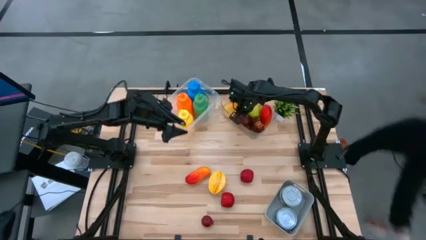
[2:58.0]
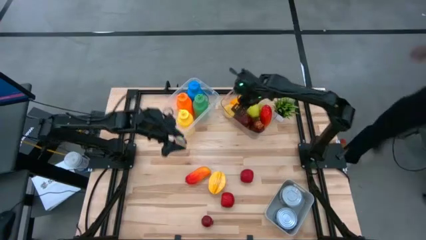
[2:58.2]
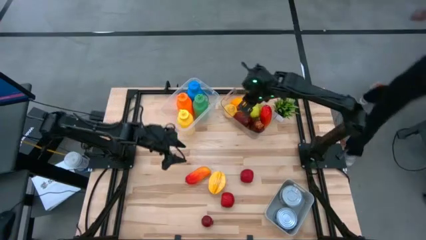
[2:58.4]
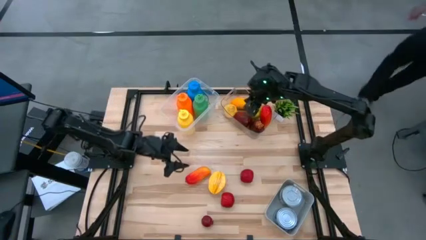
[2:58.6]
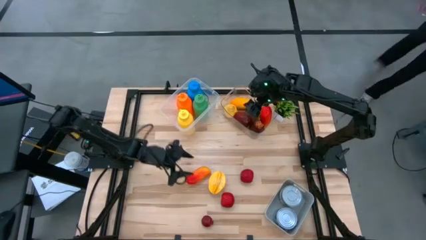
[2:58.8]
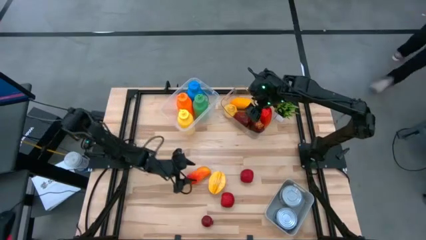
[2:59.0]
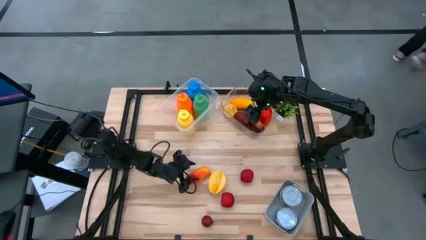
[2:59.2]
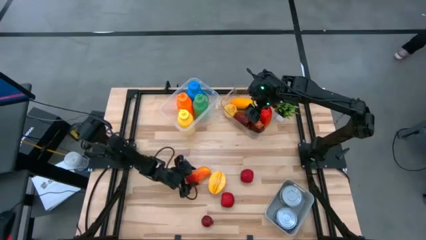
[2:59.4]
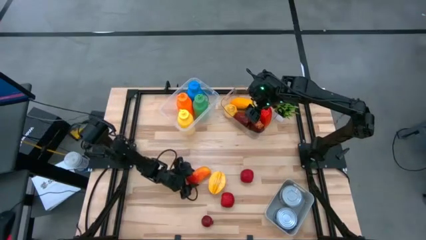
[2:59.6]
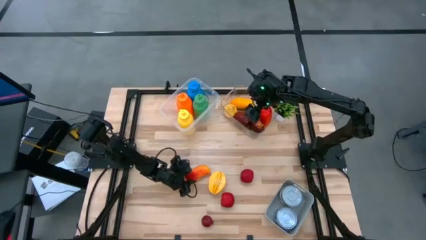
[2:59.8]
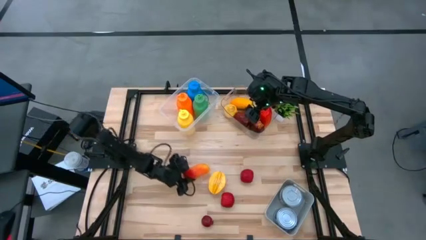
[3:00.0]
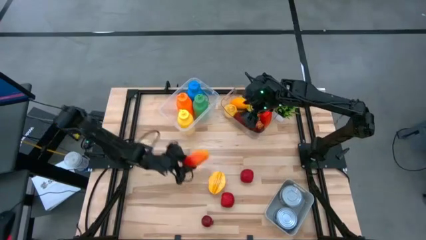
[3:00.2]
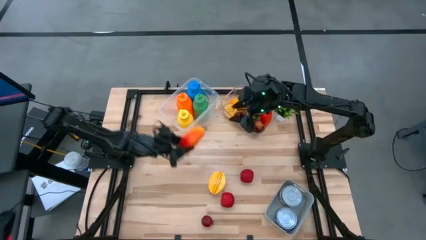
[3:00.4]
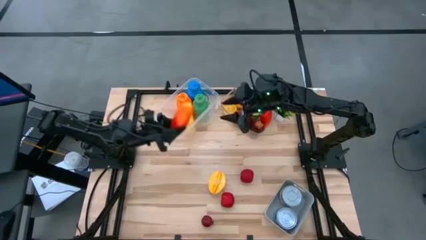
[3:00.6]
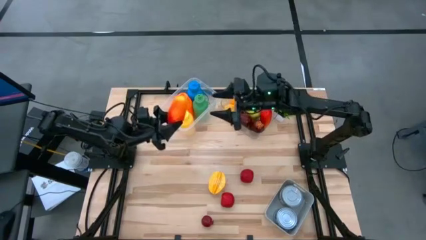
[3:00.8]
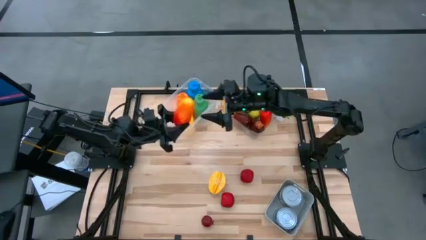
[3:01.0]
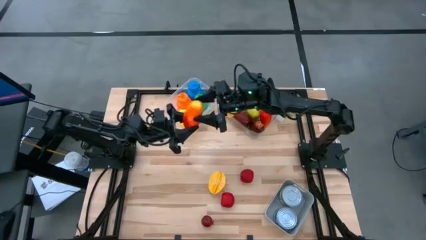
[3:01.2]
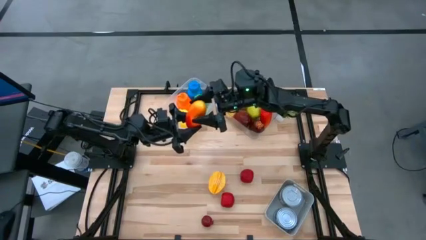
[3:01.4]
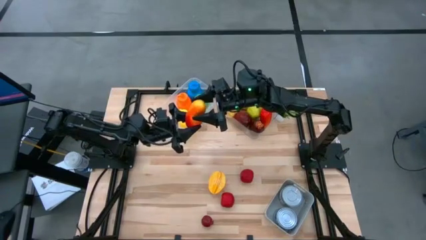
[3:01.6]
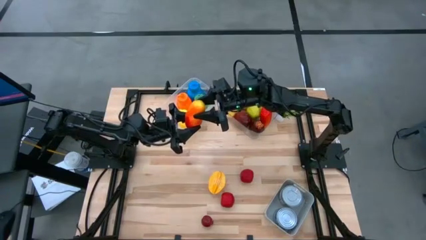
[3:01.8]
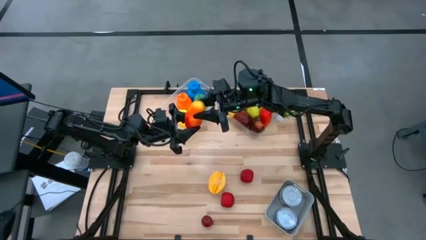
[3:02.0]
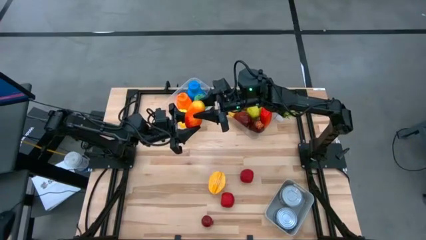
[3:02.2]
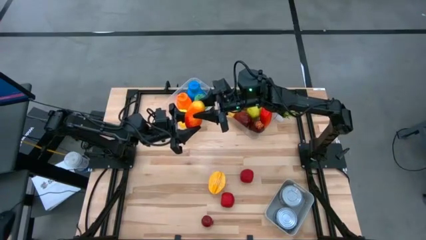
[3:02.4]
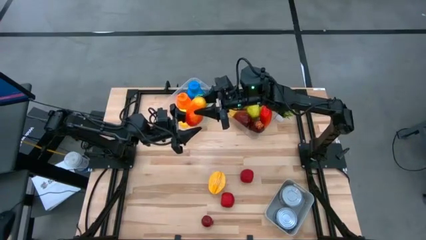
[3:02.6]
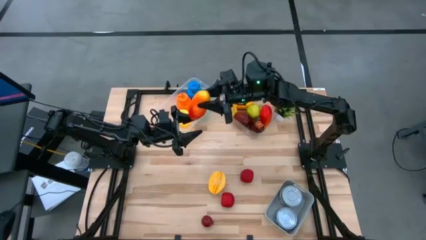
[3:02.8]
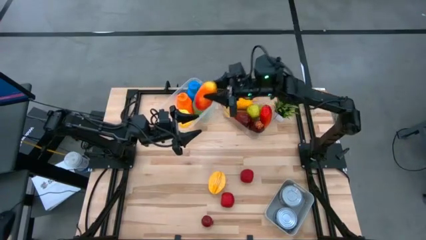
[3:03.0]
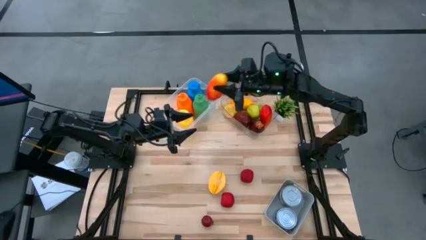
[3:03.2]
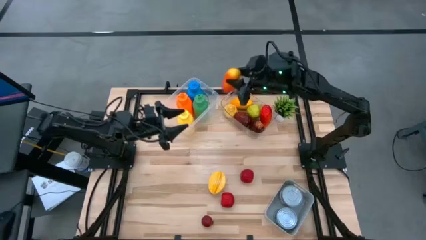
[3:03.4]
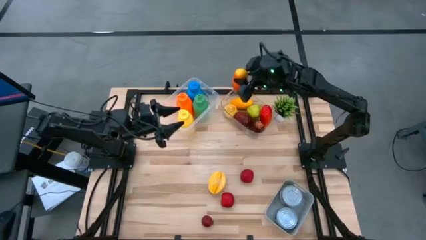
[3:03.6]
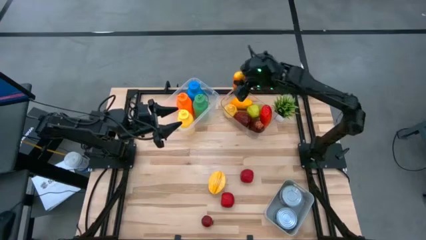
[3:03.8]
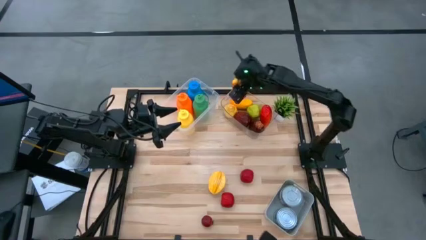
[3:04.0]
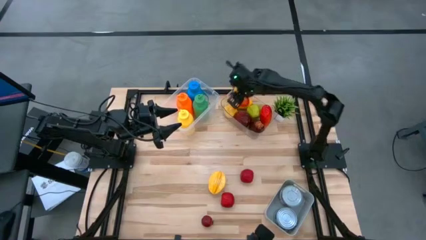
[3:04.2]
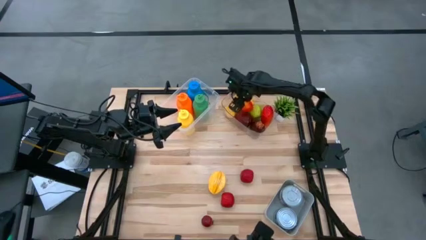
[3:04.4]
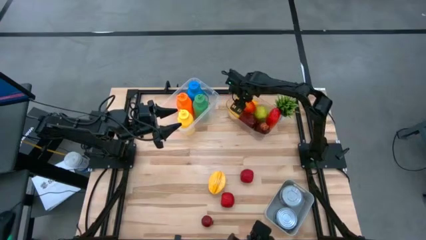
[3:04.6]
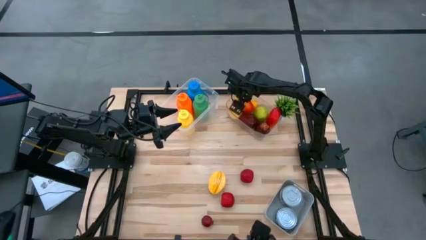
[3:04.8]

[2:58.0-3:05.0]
Task: Pick & Place Food Item
Put the orange mango into the right transparent bin

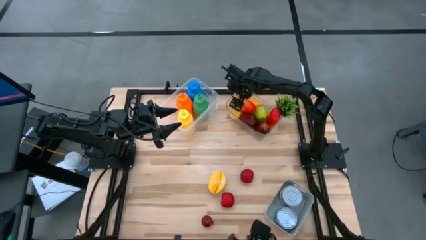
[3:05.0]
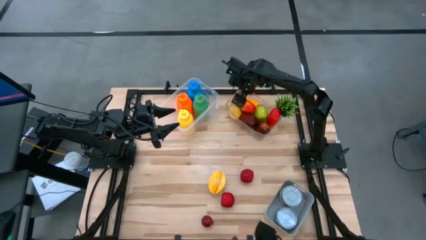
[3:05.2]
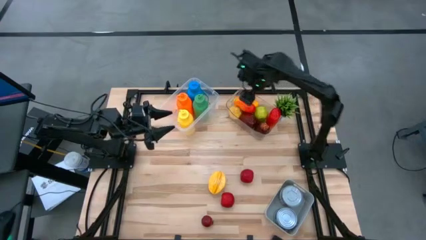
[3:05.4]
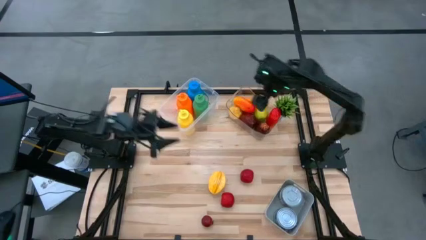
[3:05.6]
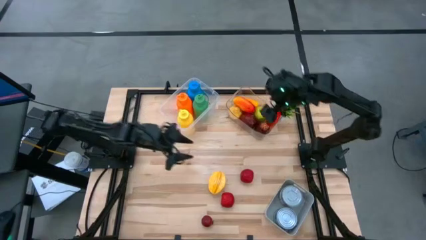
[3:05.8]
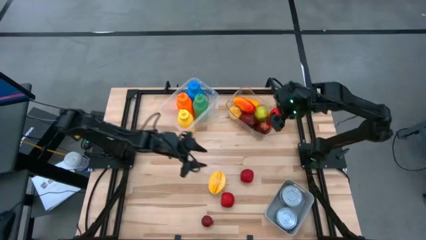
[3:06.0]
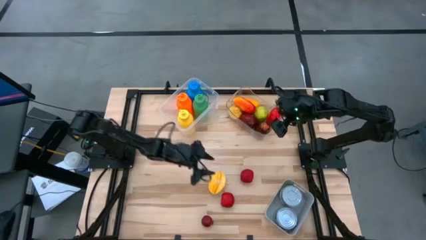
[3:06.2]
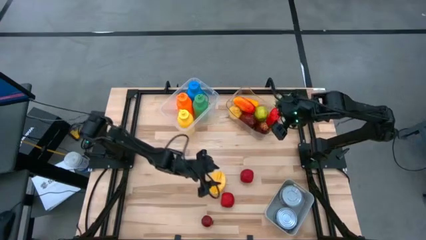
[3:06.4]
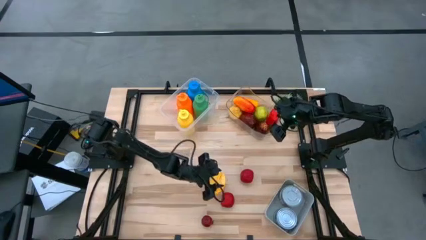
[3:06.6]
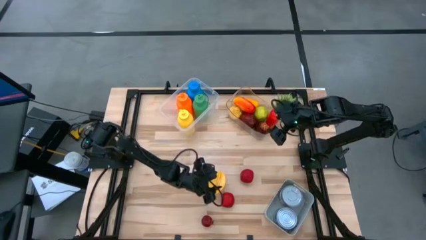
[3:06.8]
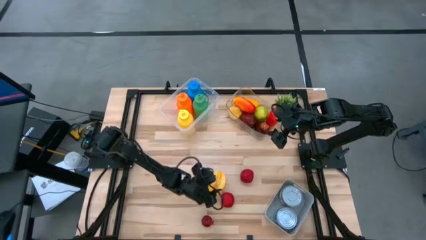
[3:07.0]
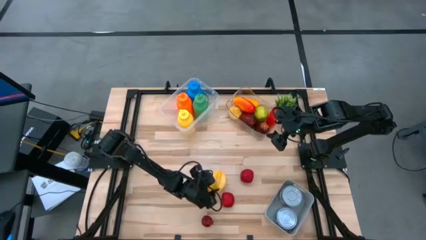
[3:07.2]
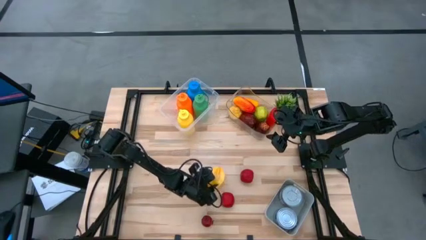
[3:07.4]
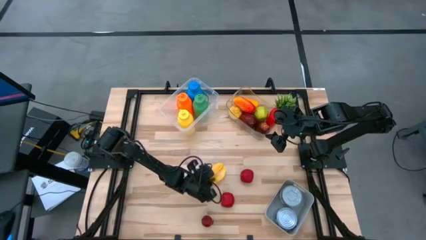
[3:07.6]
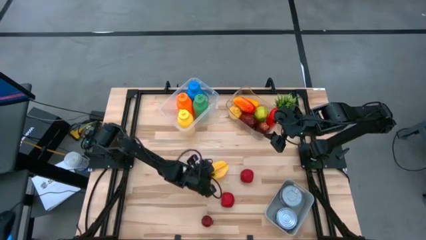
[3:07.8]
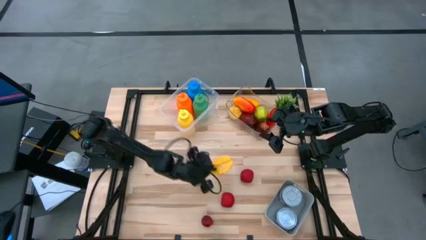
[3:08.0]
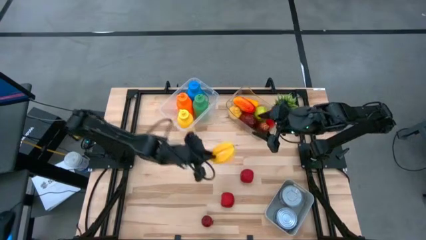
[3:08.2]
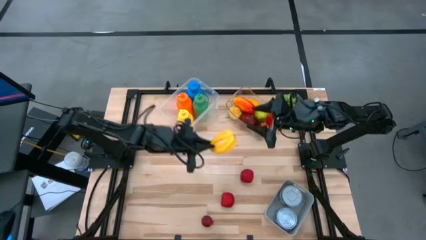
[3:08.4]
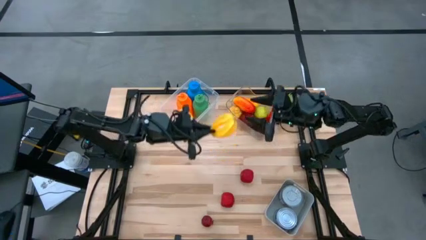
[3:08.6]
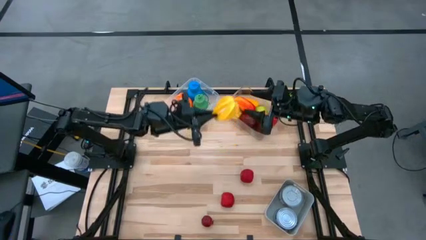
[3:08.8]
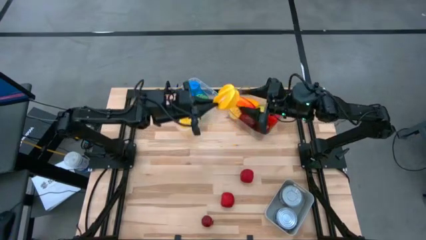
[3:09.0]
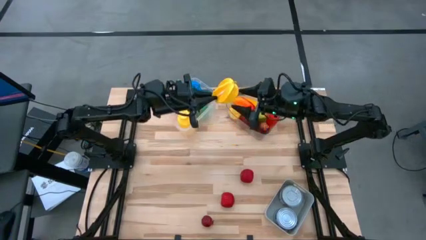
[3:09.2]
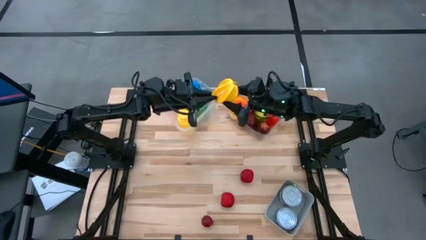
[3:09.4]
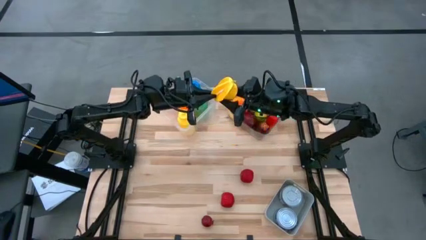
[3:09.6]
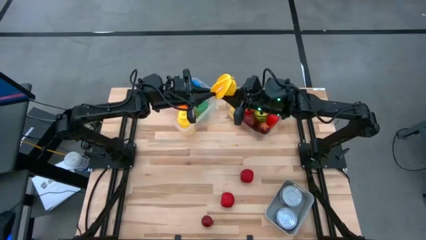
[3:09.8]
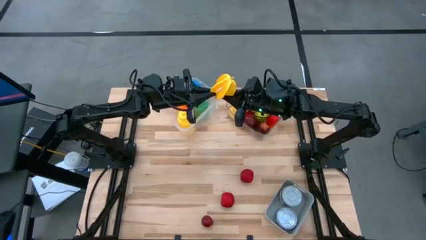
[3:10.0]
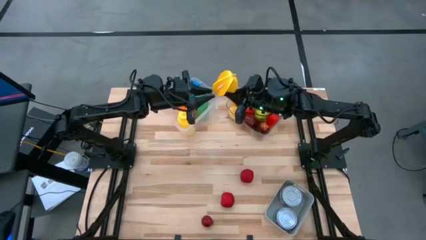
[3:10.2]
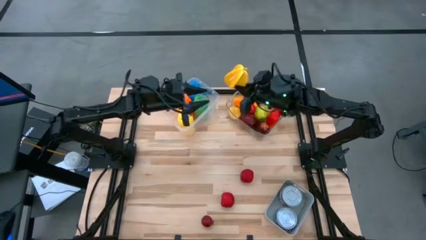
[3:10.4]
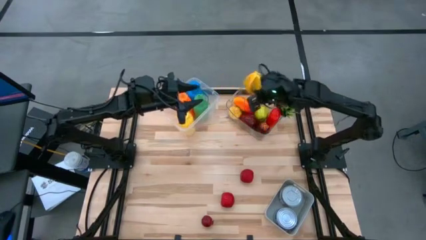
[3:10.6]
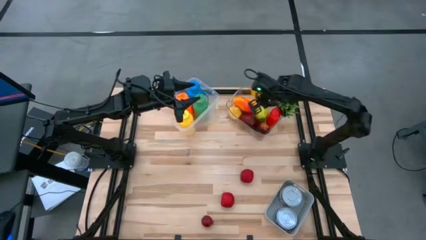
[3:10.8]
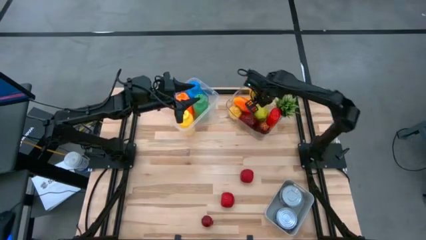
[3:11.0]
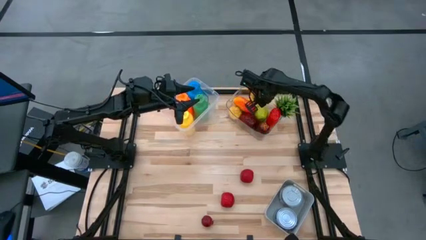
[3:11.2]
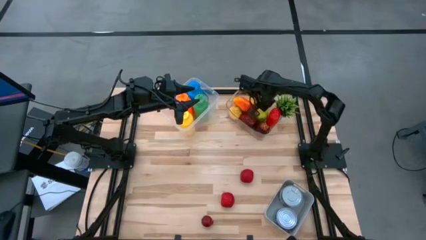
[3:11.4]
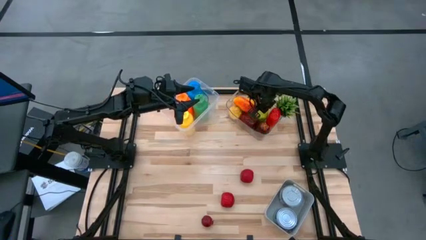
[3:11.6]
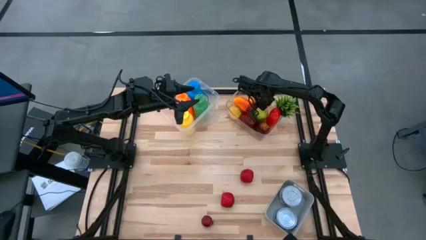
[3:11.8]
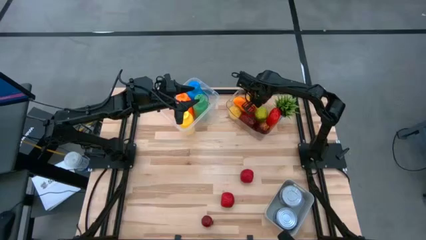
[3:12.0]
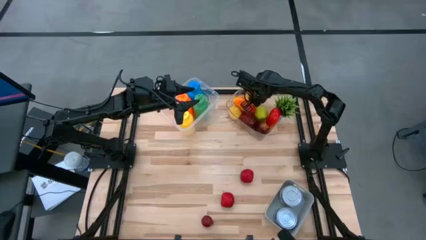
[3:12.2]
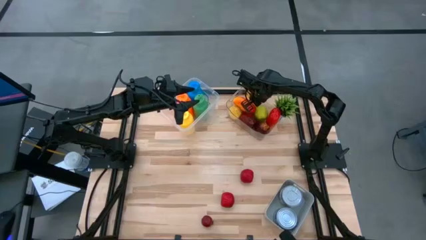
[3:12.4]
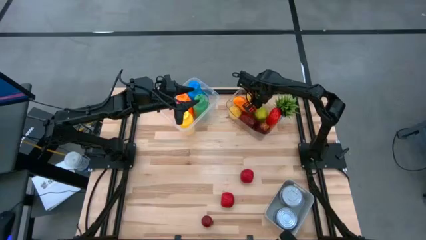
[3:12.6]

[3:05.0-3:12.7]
Put the yellow star fruit into the right transparent bin

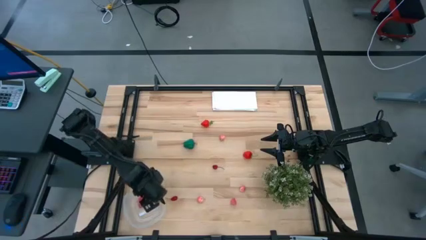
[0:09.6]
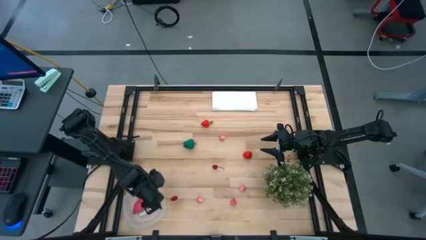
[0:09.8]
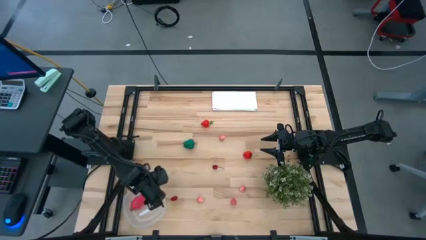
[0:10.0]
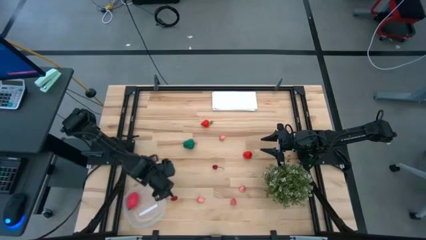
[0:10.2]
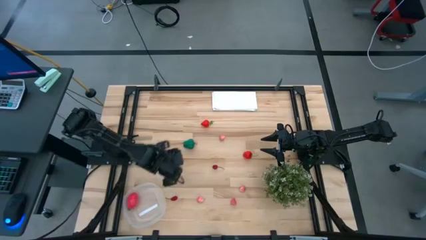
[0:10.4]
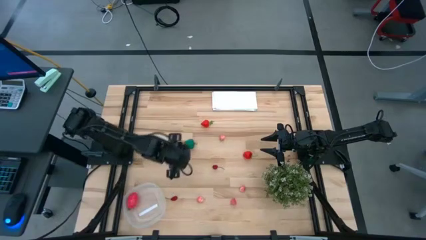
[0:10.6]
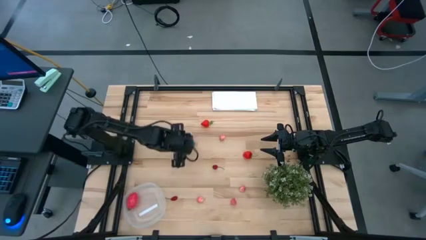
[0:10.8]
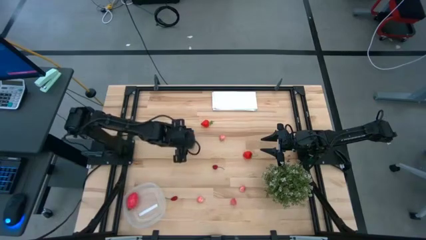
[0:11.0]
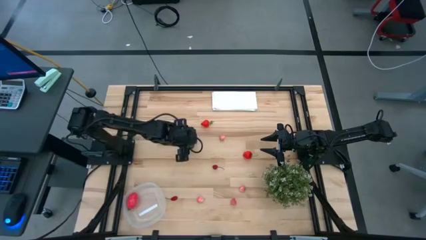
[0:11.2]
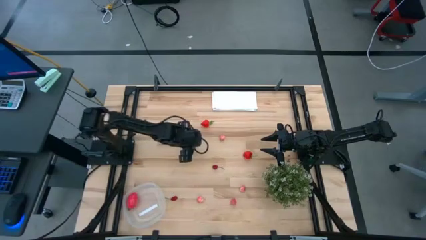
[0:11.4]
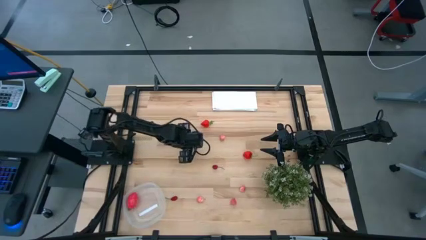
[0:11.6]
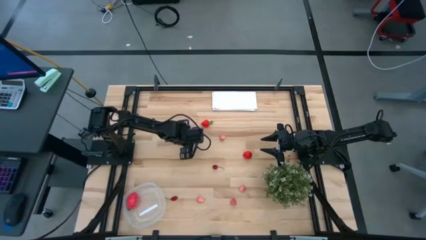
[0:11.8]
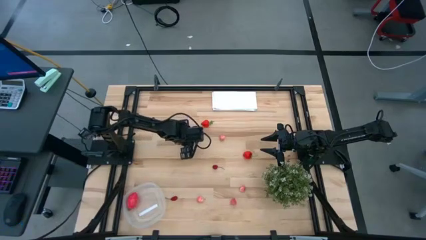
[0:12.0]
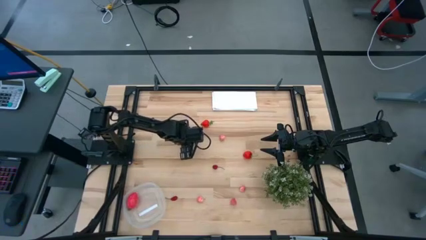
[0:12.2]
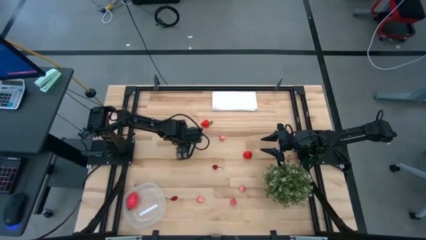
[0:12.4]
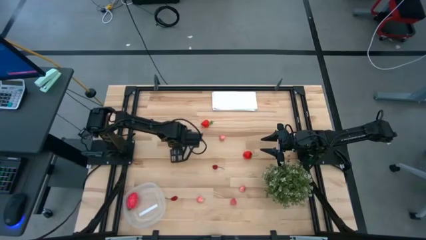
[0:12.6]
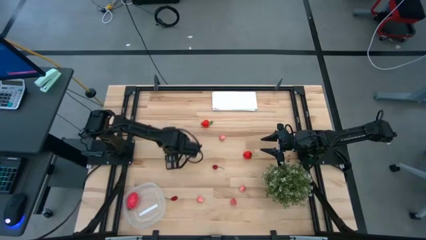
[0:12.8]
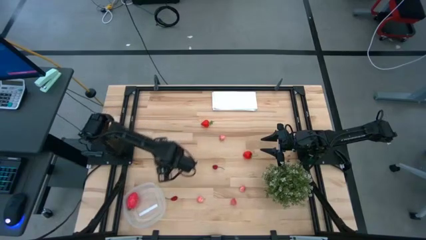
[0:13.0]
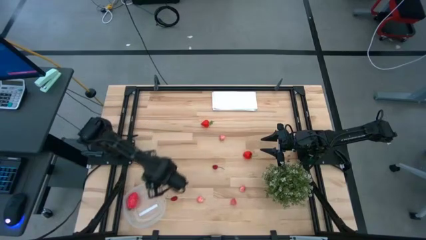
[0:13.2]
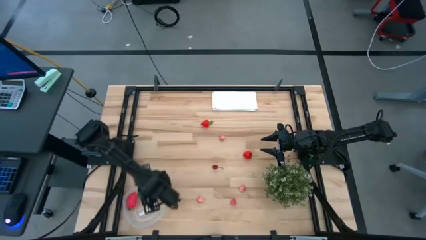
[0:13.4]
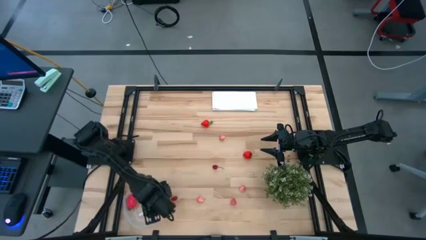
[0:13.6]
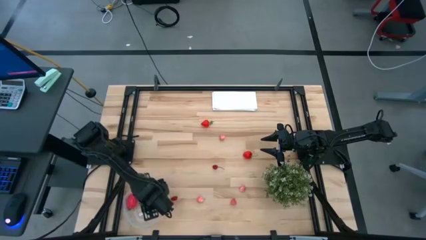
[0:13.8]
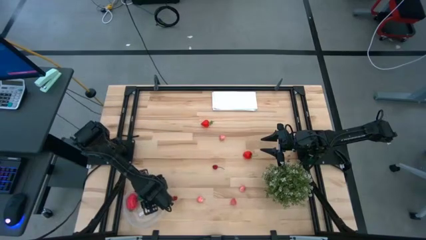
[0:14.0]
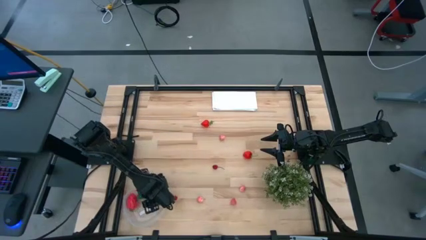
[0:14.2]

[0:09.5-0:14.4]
Task: Pick and placing Produce into tupperware
Put the green bell pepper into the transparent plastic container
